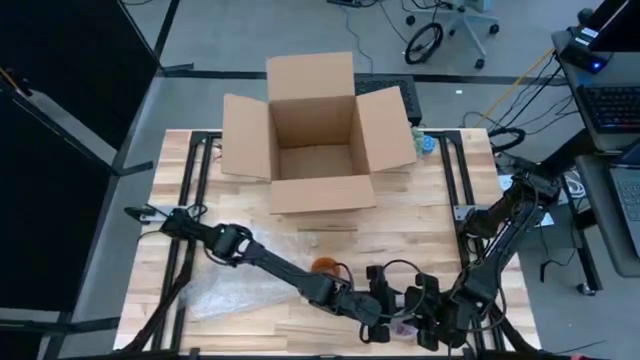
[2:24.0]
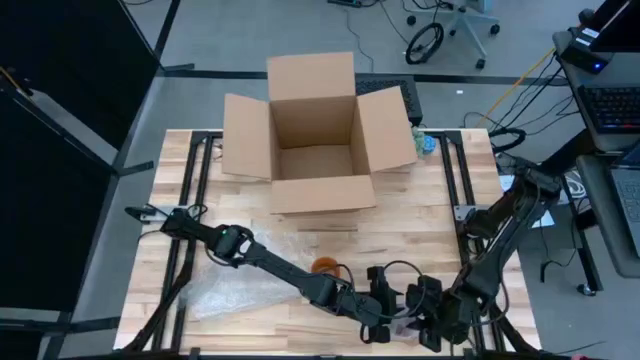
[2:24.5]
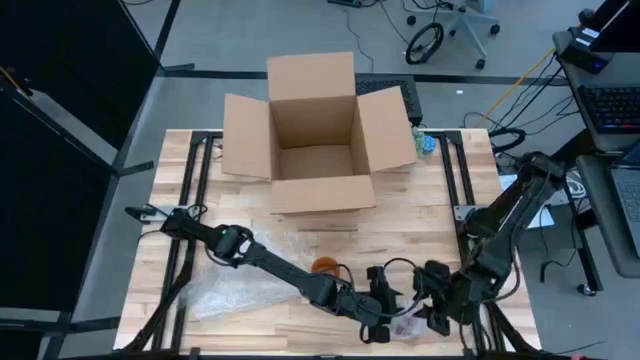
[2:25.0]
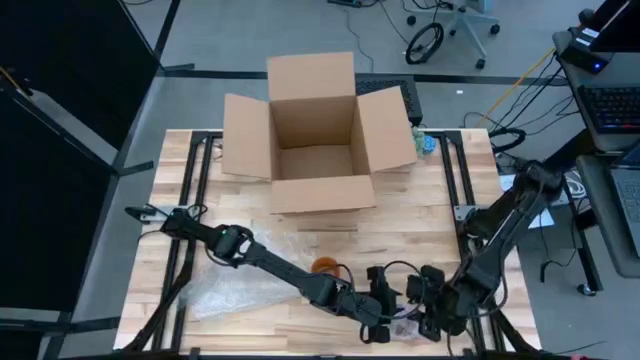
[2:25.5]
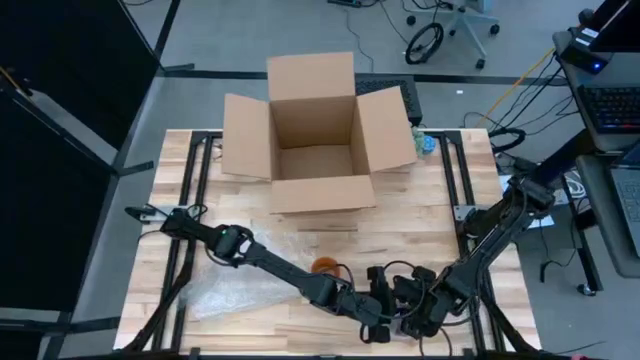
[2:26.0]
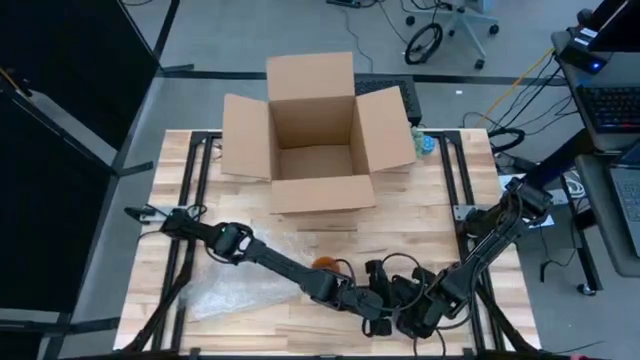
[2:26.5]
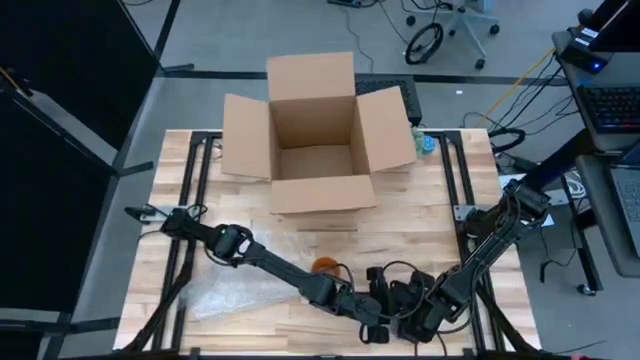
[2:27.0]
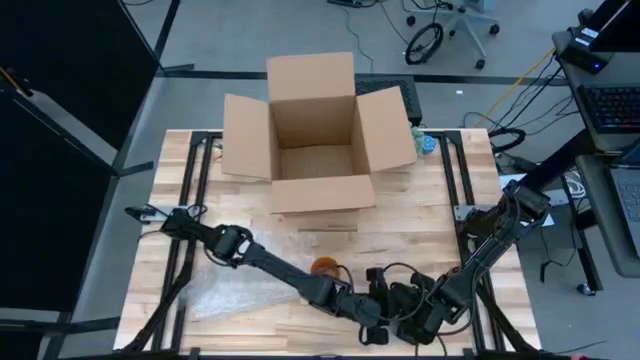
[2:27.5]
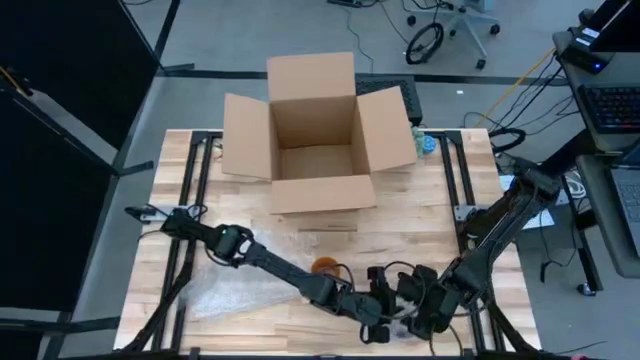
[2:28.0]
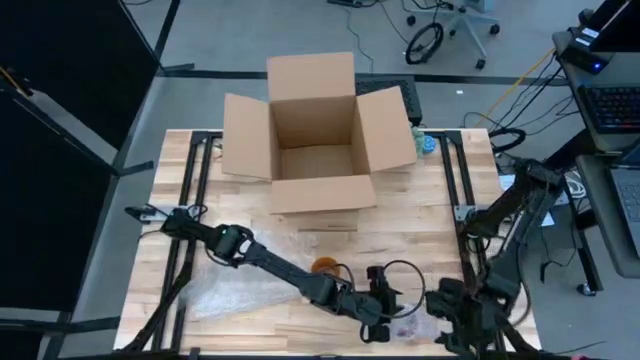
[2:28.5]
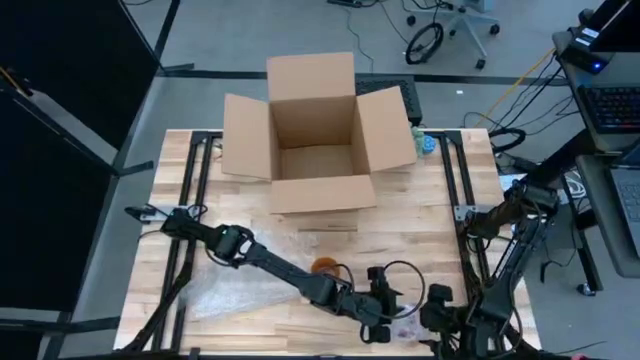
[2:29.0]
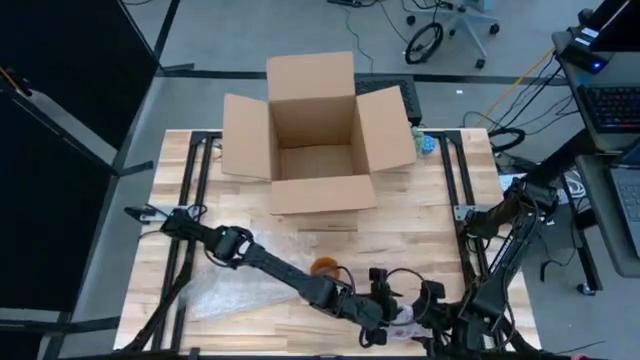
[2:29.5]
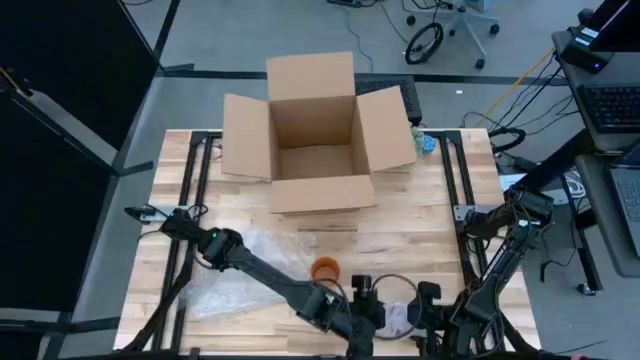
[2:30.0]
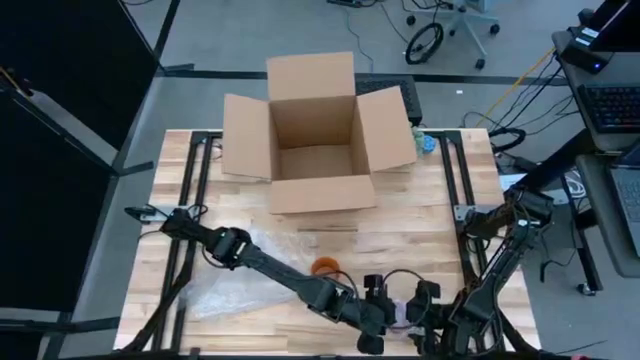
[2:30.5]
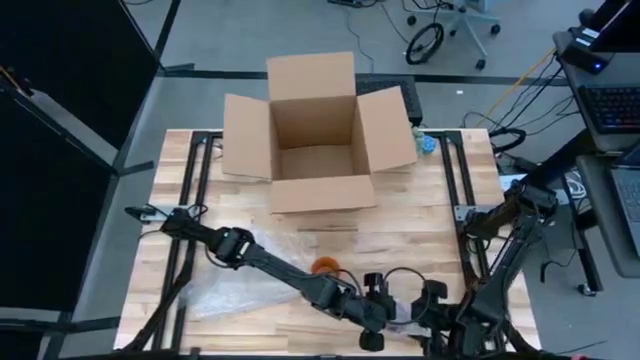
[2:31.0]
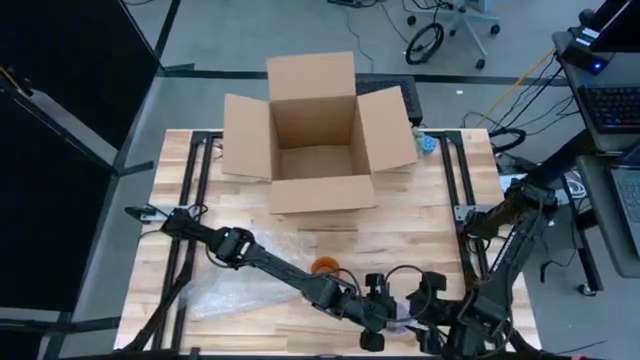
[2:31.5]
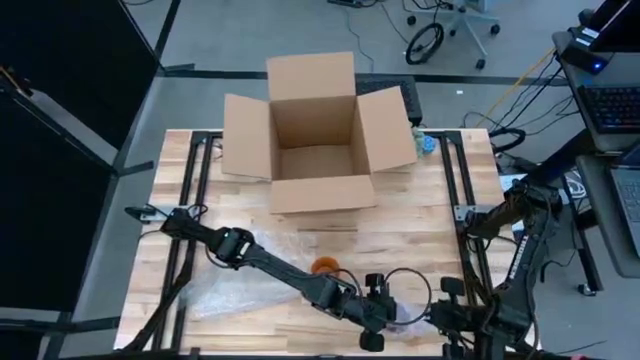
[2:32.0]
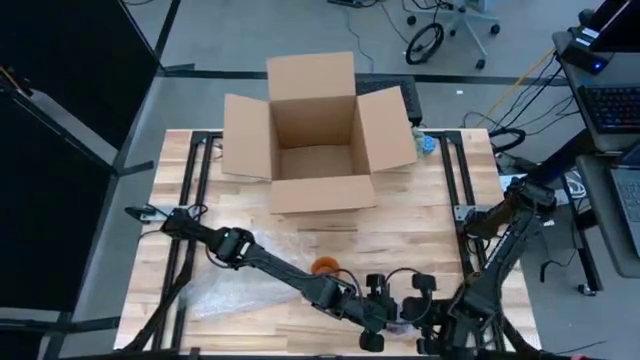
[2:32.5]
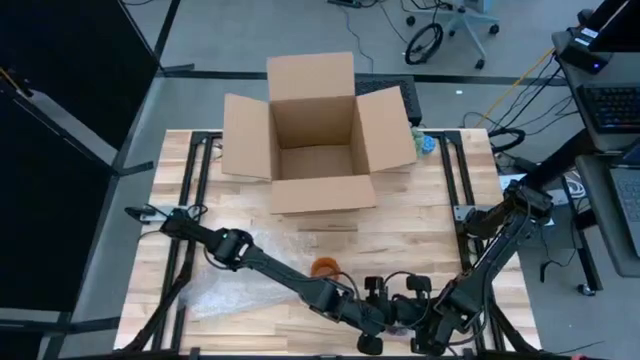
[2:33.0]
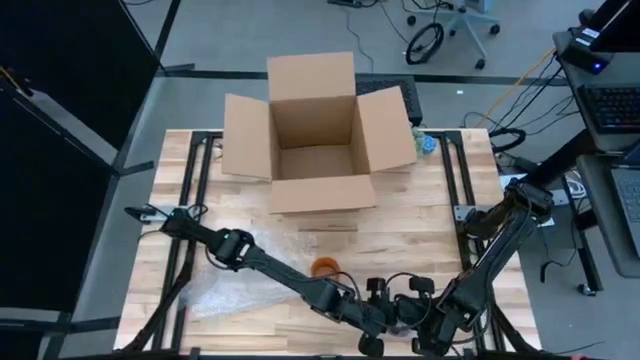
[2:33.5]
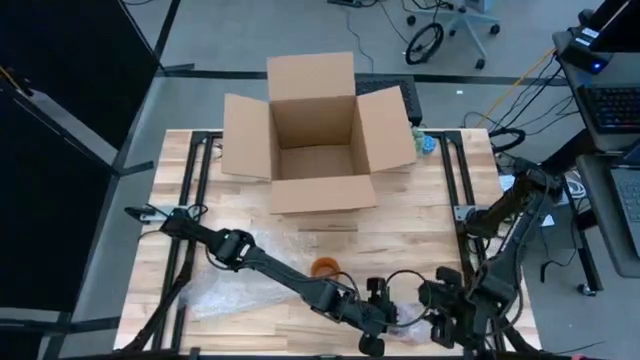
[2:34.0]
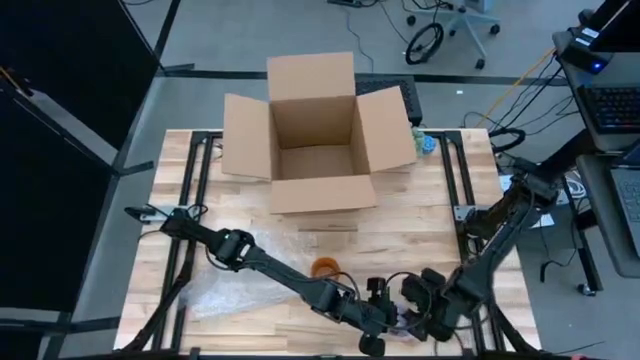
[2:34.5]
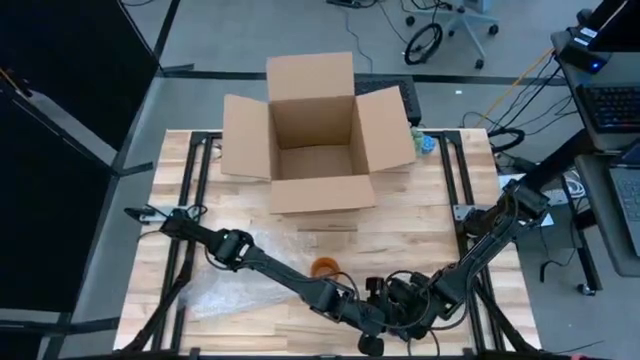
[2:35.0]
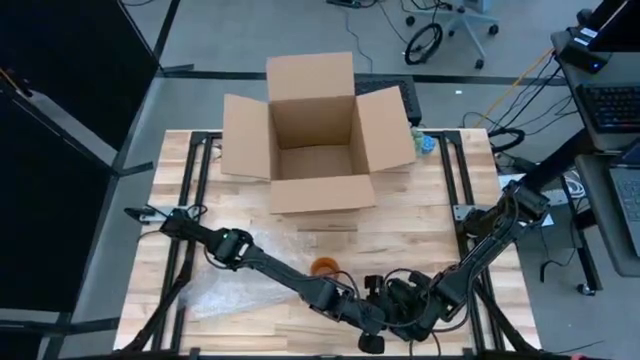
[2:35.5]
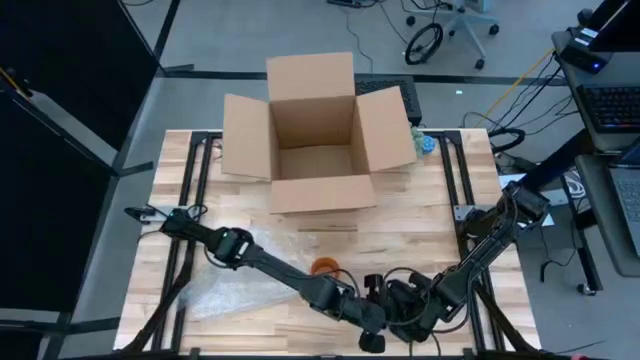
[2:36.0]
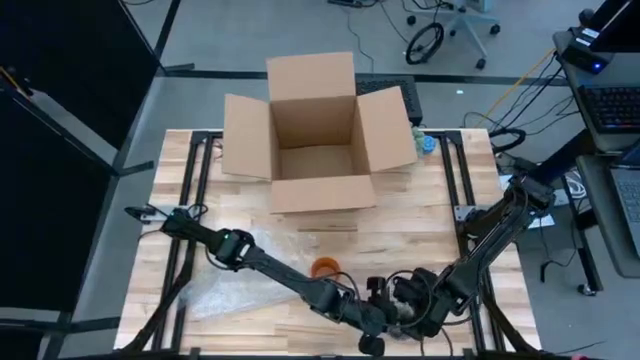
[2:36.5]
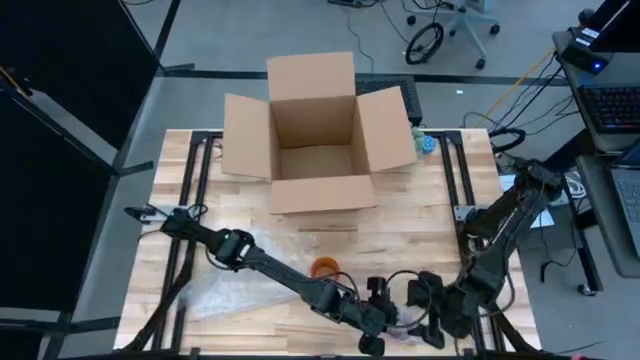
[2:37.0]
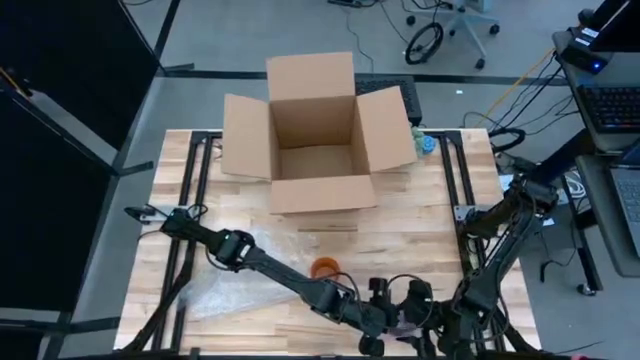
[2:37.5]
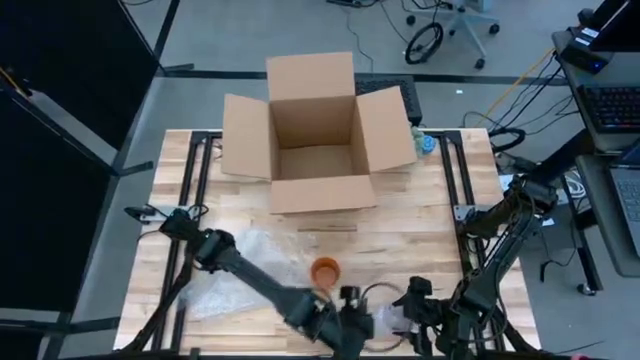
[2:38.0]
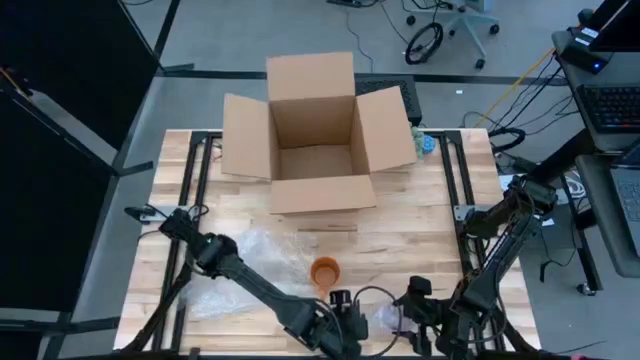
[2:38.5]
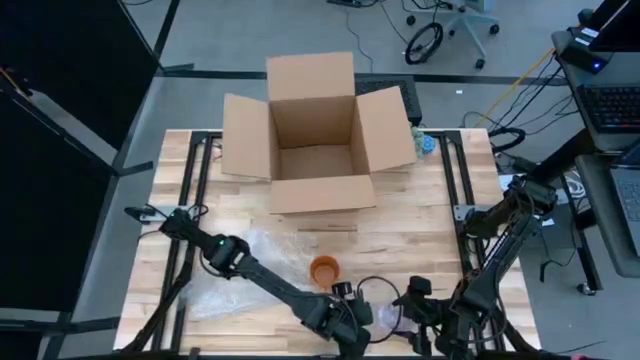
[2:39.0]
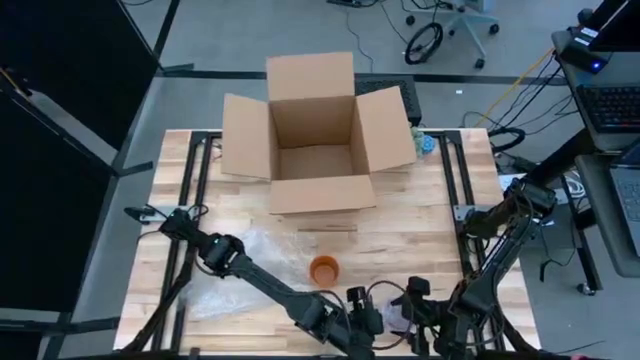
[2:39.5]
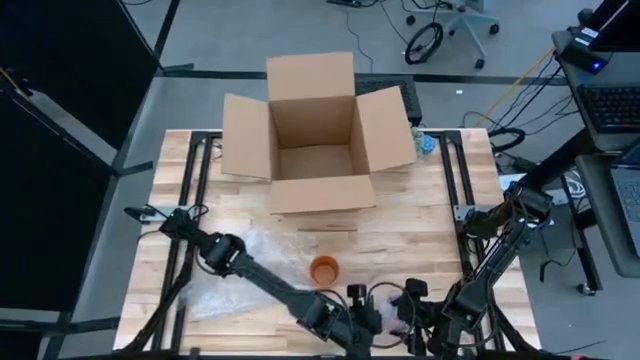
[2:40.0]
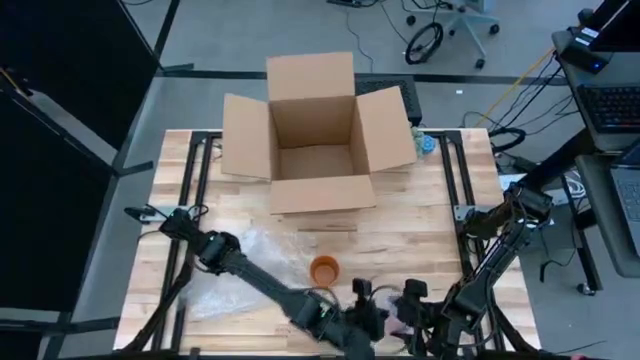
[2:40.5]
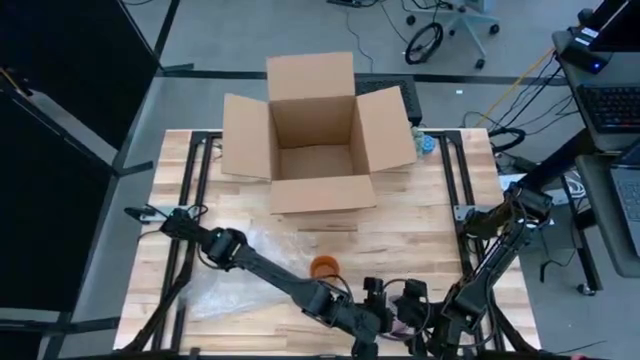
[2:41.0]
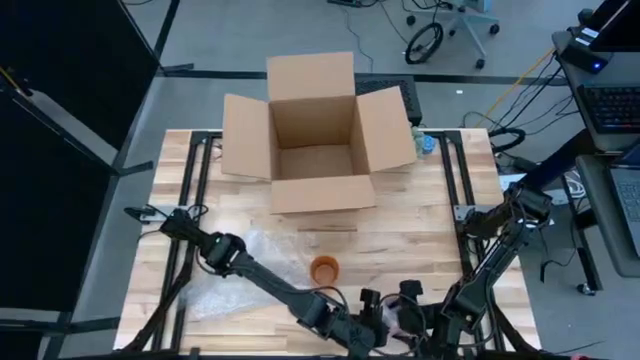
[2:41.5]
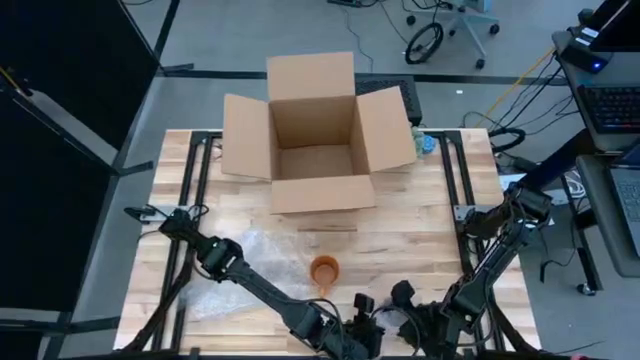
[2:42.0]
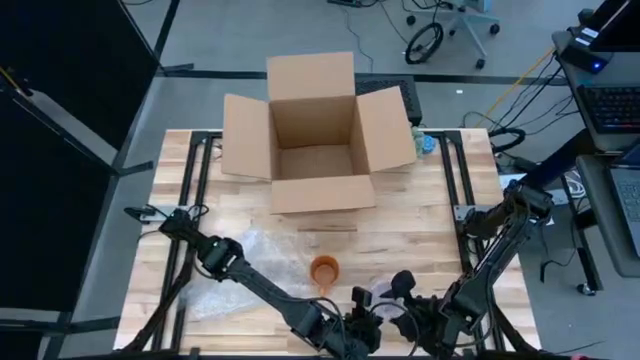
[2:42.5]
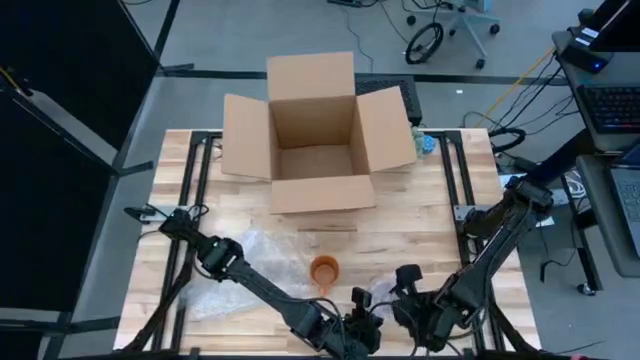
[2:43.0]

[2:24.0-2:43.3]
Task: wrap mug
Wrap the pink mug with the transparent bubble wrap
